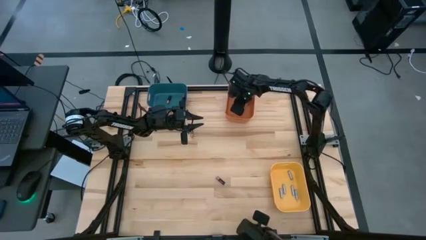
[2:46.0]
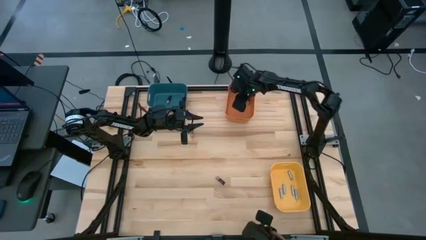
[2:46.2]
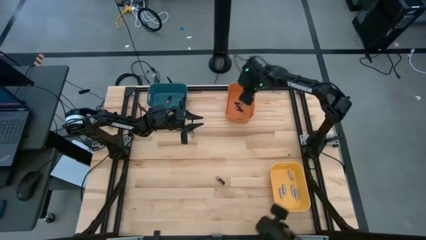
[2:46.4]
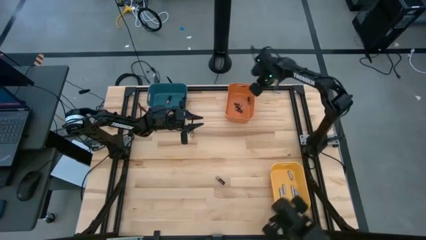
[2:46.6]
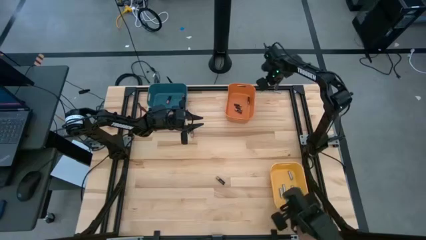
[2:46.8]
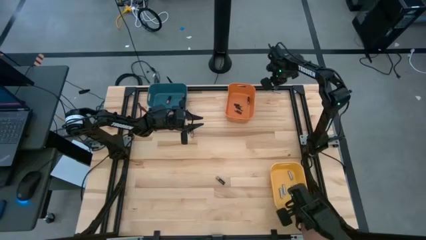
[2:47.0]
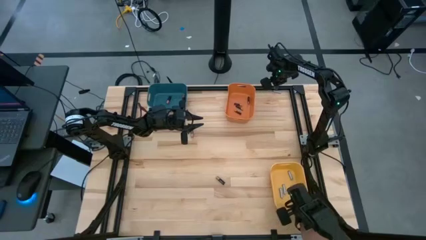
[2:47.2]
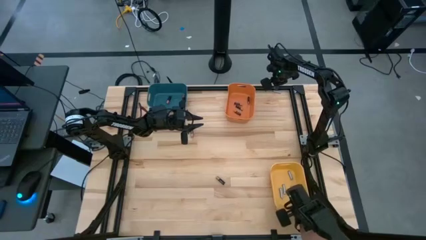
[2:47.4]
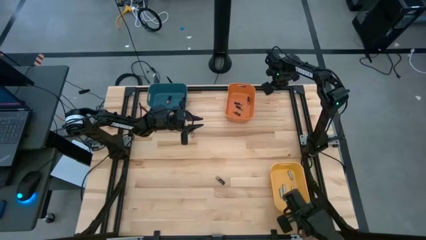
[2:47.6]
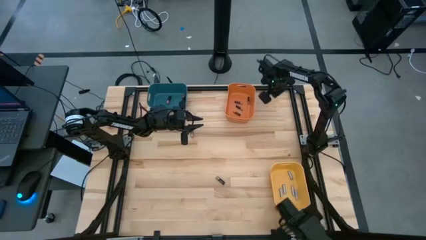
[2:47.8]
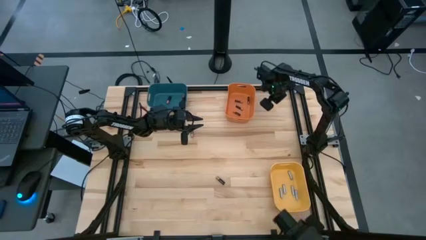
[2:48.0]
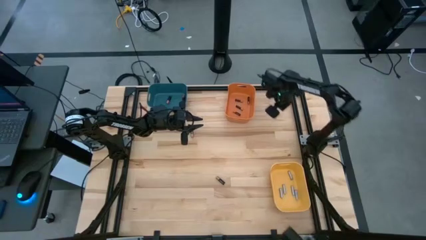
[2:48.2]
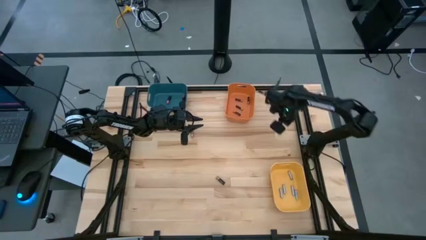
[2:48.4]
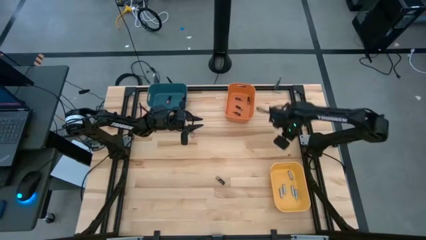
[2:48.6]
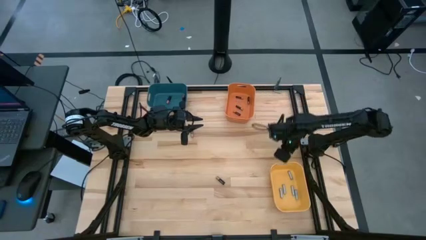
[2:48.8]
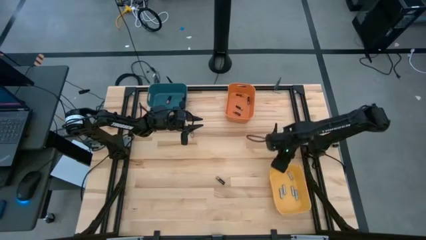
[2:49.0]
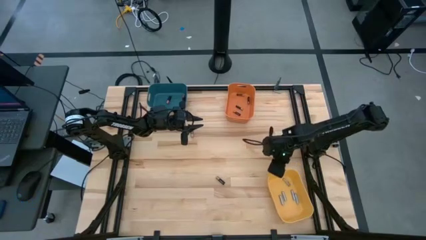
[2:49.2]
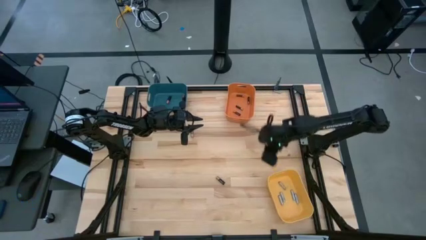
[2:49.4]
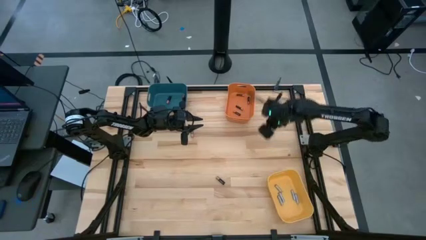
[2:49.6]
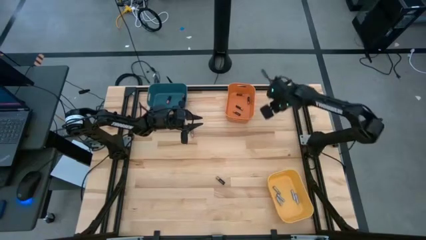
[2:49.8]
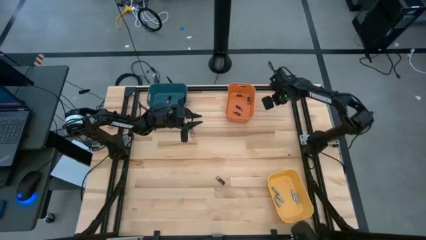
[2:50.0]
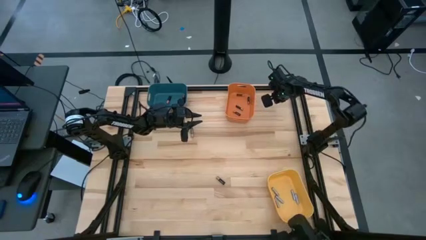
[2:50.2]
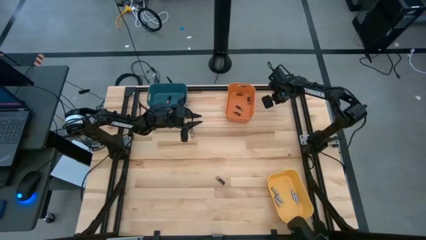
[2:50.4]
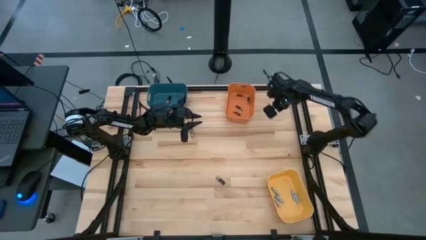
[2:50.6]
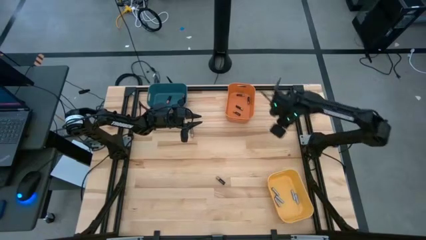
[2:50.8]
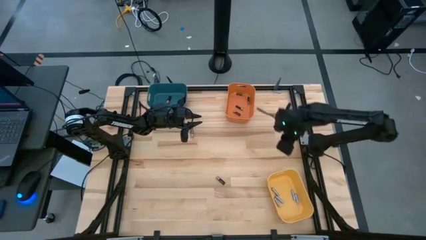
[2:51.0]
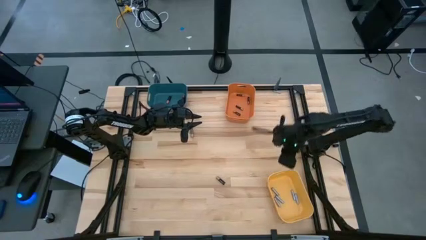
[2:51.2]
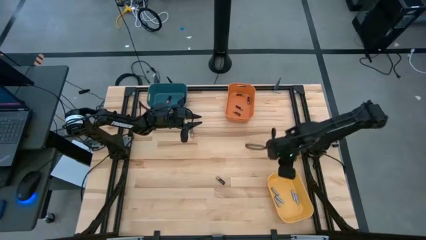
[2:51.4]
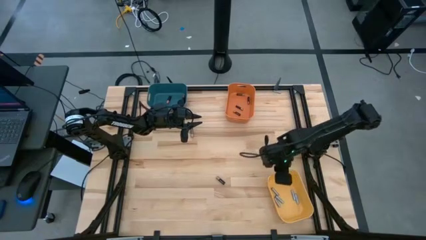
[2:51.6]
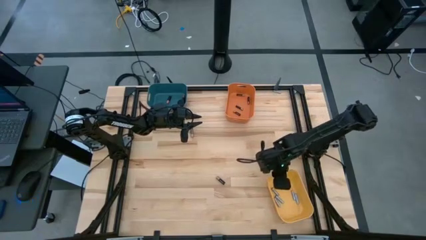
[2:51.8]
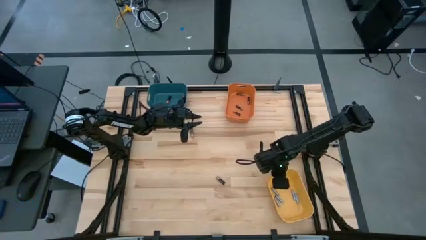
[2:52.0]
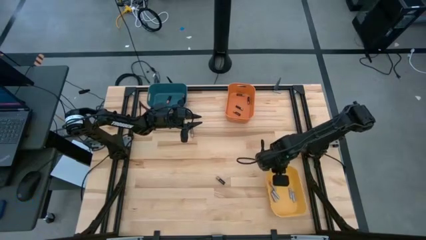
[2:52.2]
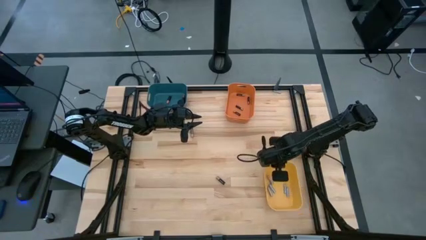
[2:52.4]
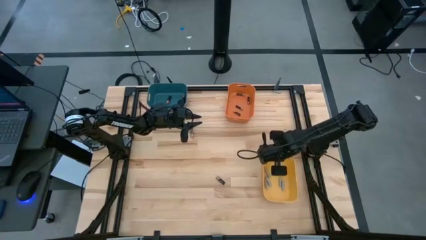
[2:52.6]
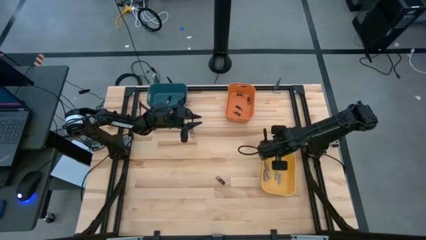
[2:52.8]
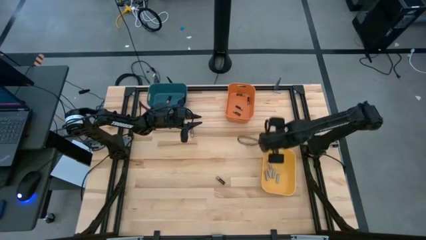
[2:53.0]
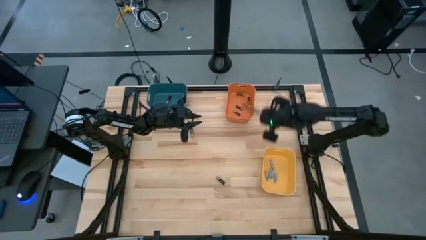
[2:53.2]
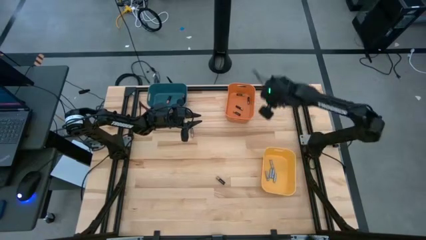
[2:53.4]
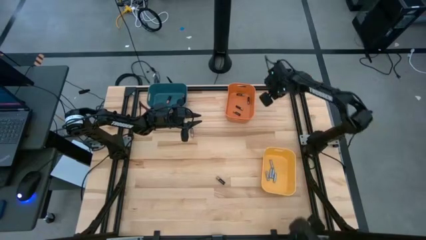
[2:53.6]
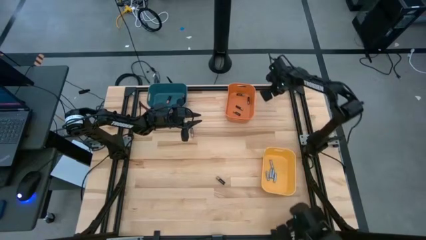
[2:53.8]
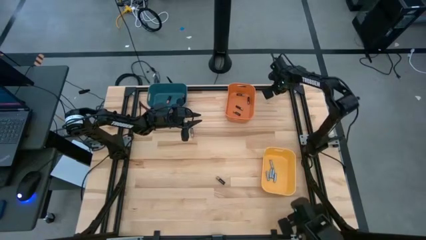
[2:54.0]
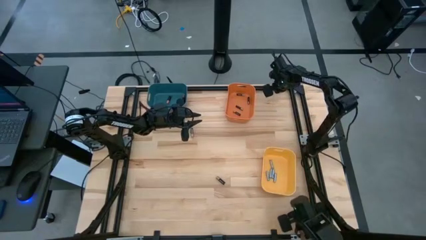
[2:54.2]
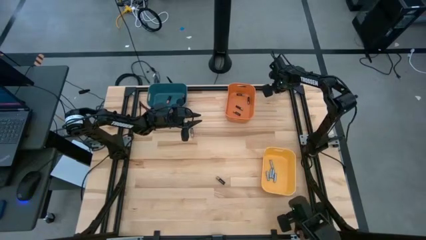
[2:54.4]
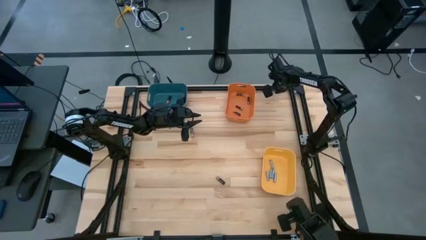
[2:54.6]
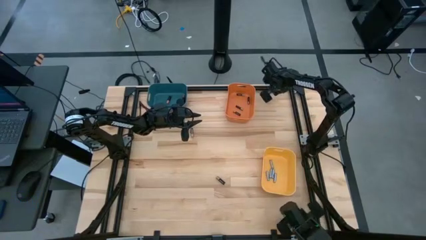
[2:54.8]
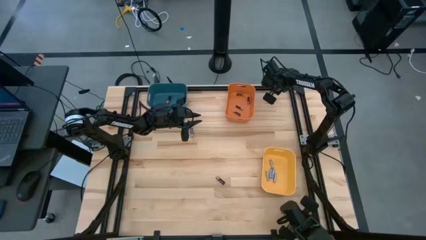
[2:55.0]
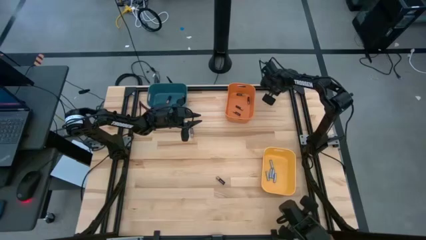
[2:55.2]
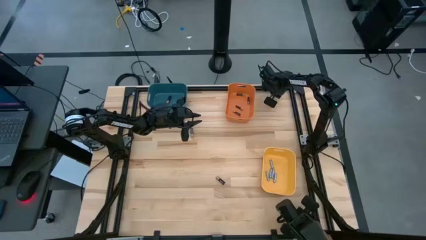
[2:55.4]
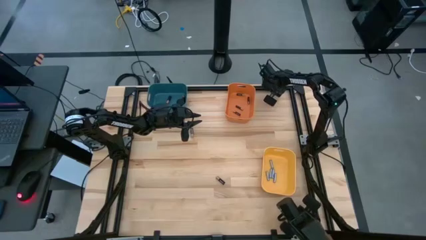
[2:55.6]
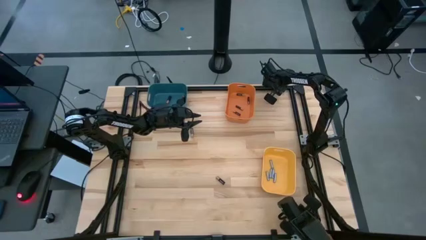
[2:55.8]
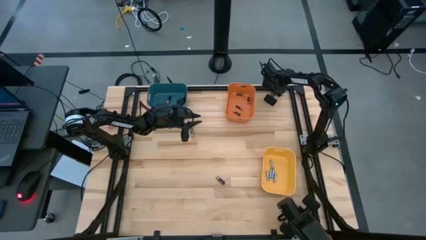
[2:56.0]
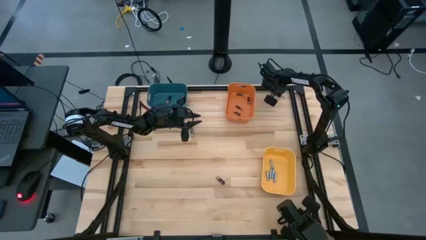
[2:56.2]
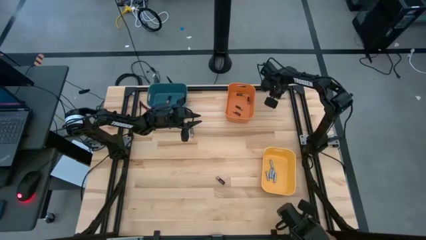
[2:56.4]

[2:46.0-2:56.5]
Task: Sort batteries
Put the silver battery into the yellow bin
